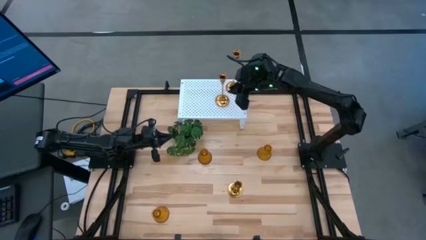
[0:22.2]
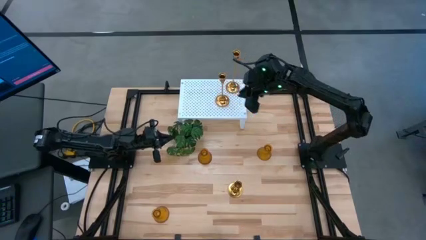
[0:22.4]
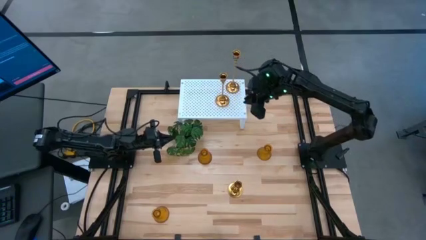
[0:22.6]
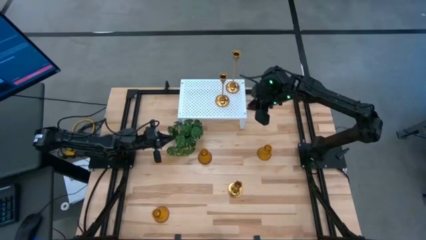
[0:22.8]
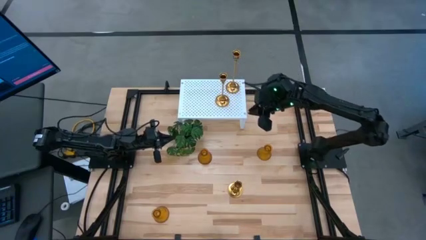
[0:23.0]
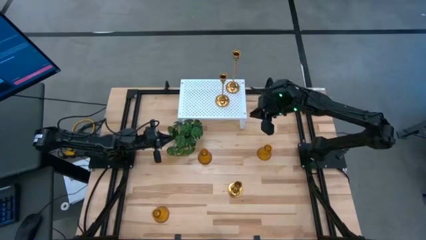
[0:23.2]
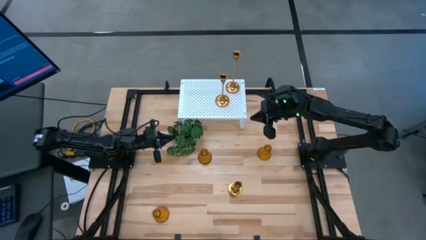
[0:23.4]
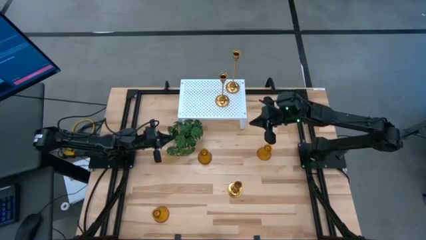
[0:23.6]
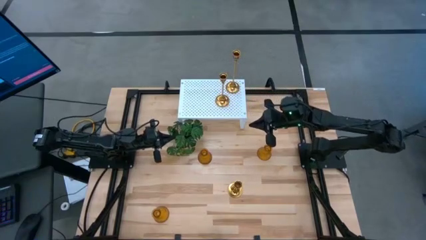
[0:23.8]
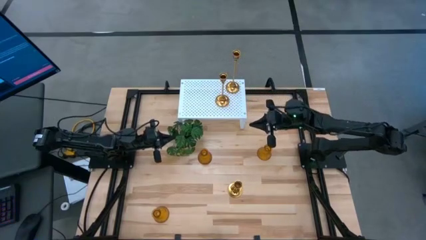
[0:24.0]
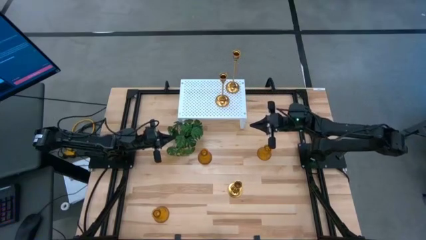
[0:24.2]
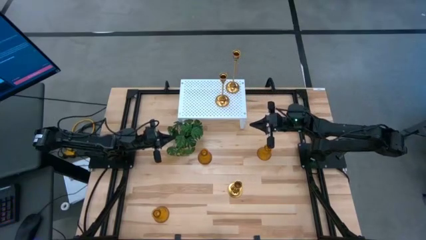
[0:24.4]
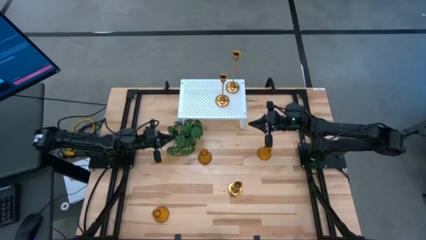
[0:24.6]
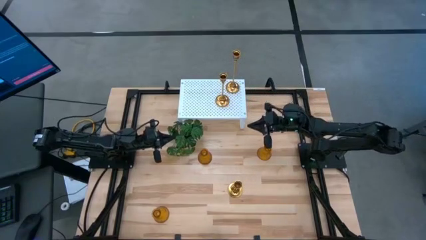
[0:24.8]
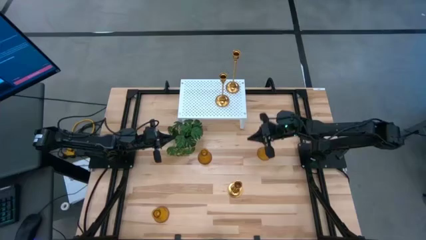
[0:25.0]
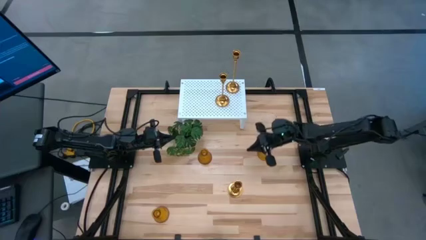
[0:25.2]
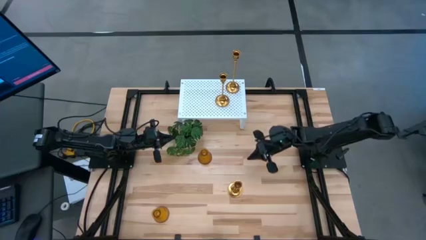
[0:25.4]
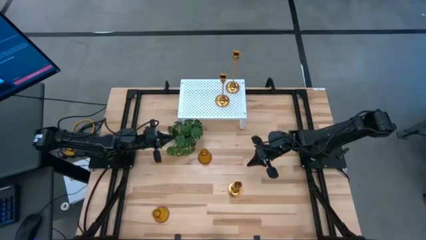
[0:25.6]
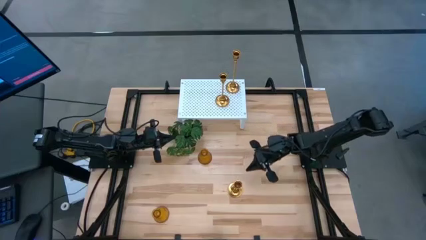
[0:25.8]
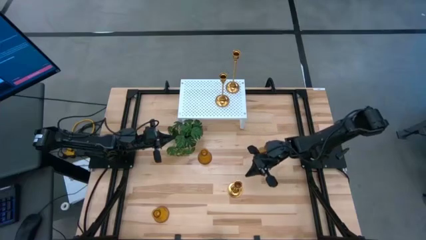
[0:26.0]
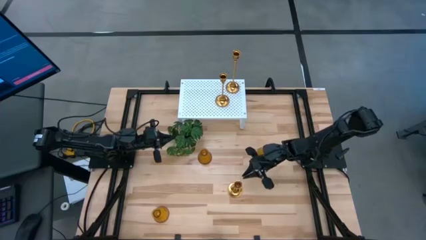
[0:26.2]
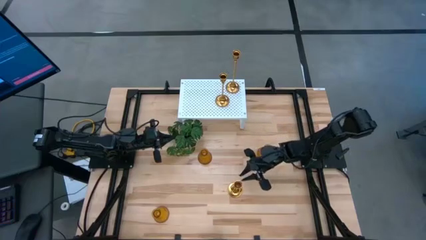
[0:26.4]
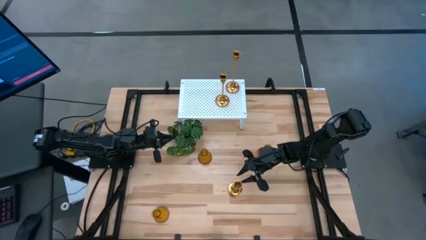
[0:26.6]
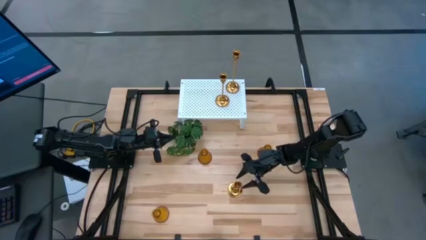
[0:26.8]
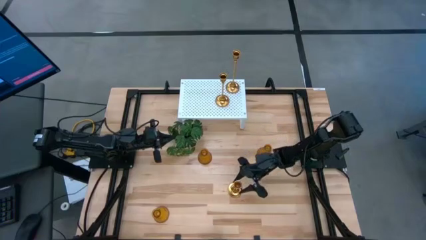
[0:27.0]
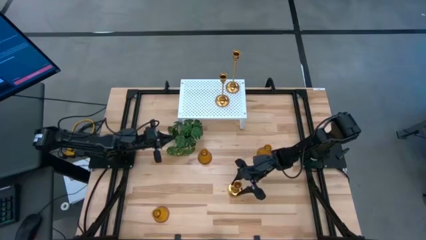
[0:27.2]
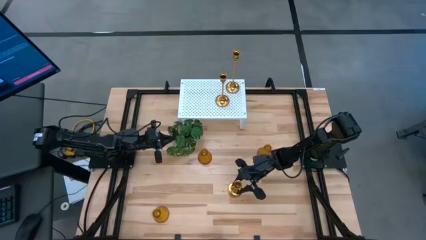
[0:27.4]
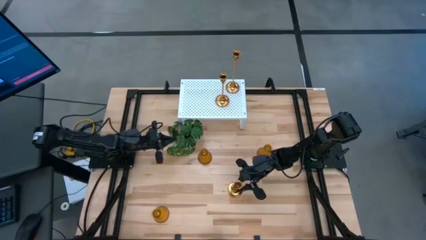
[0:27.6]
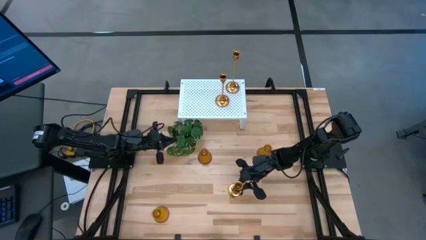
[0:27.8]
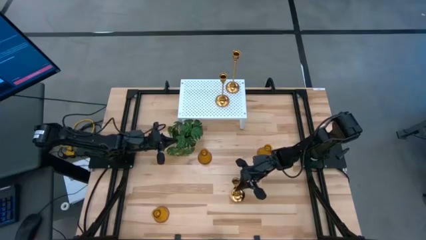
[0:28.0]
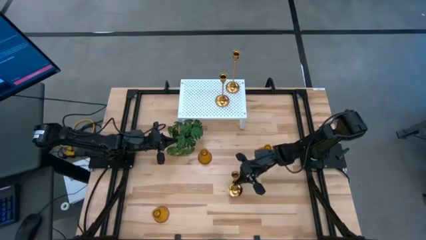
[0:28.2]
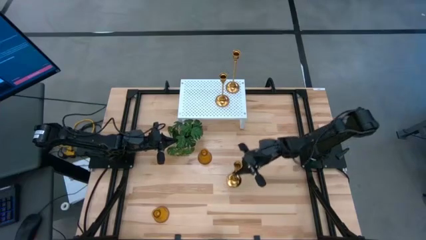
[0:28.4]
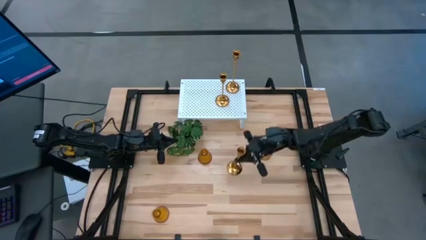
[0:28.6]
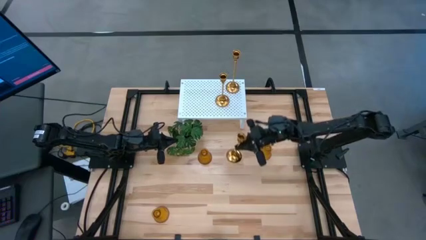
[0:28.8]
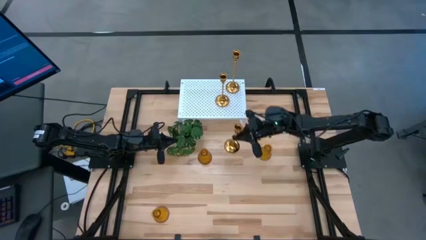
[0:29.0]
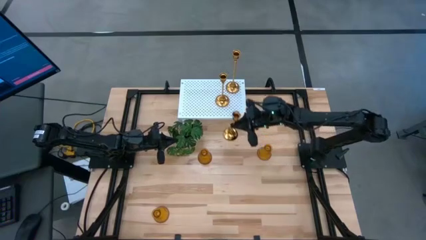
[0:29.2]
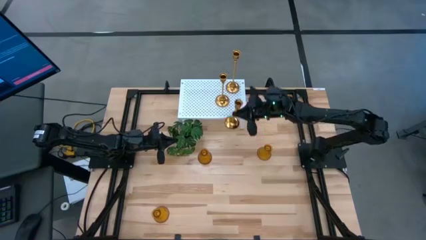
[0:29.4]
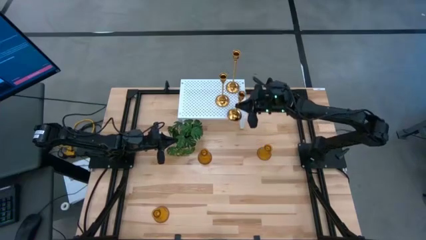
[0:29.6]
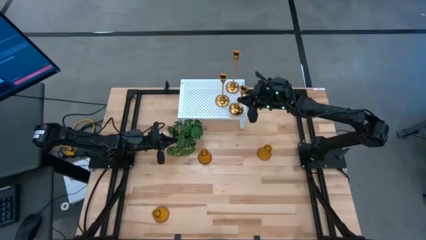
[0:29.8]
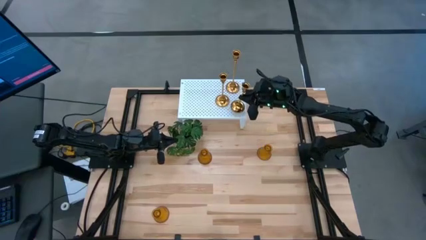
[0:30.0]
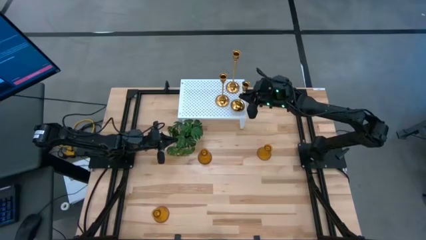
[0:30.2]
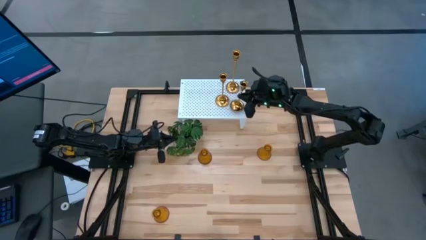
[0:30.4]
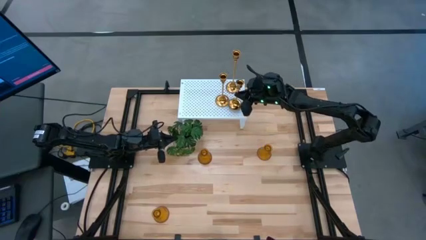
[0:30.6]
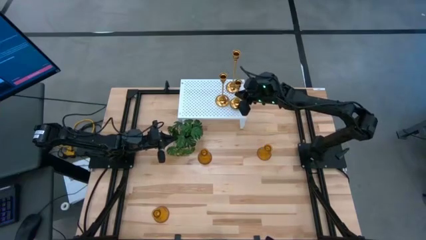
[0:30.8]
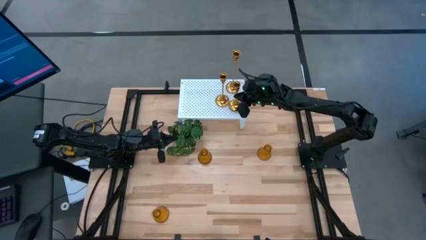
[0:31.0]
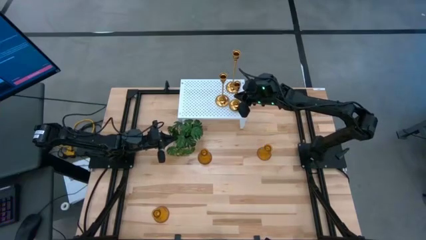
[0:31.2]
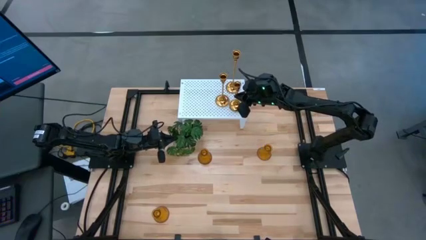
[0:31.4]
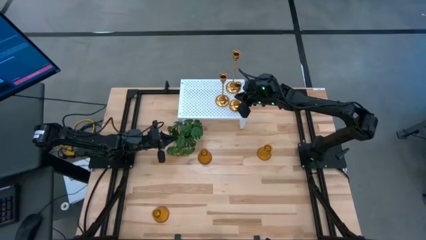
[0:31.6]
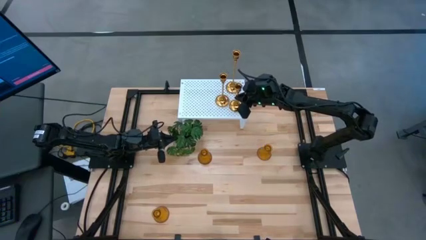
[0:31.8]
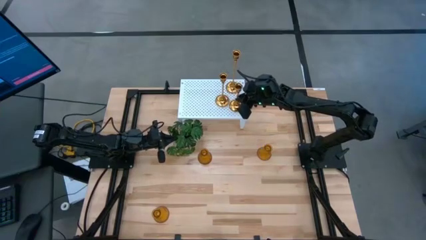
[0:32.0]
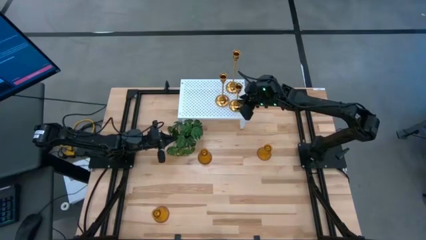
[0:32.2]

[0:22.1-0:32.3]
Task: Pick & Place candle stick holders
Put the gold candle holder on the shelf

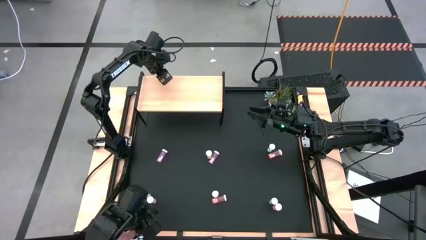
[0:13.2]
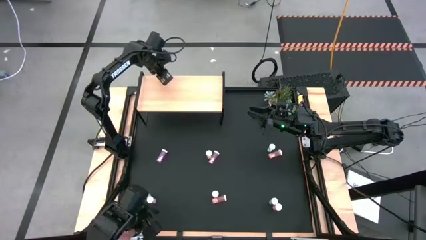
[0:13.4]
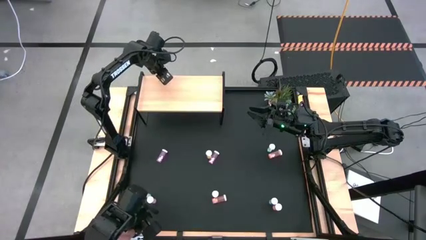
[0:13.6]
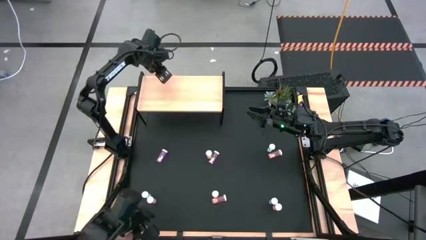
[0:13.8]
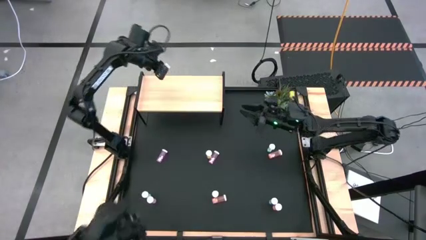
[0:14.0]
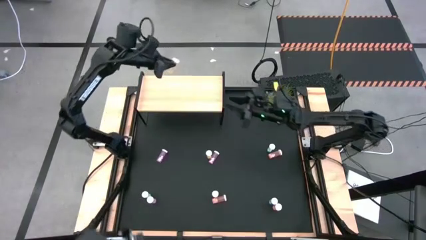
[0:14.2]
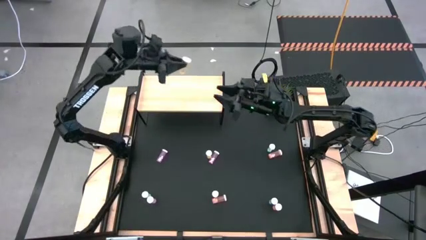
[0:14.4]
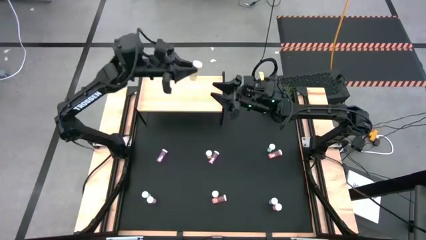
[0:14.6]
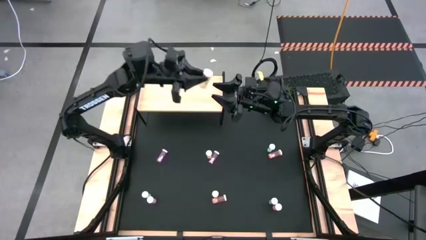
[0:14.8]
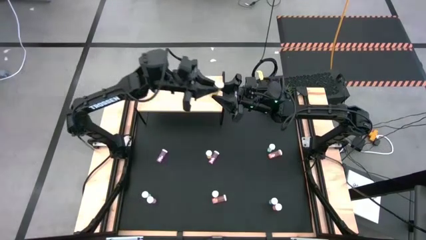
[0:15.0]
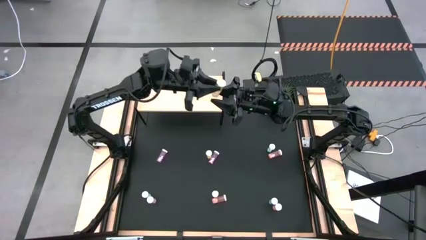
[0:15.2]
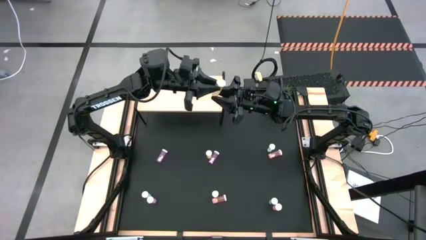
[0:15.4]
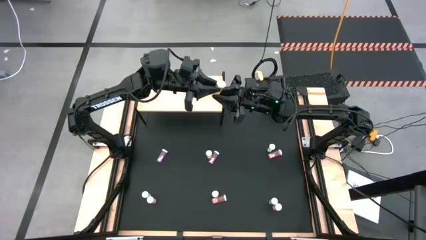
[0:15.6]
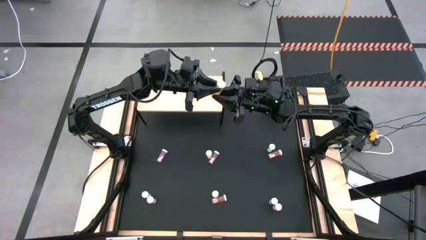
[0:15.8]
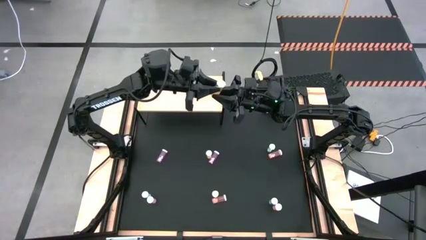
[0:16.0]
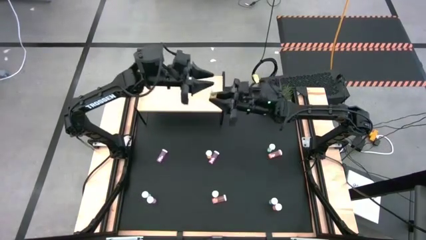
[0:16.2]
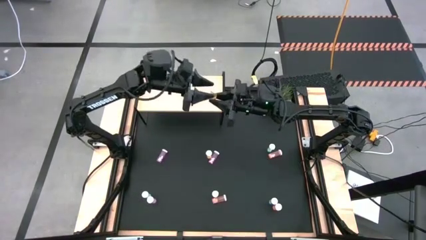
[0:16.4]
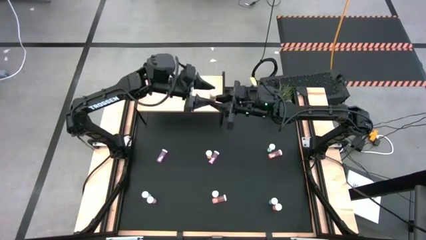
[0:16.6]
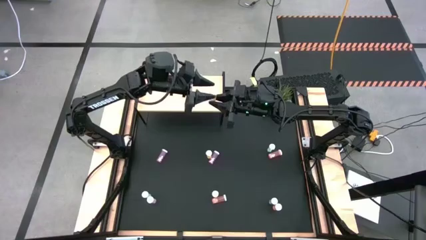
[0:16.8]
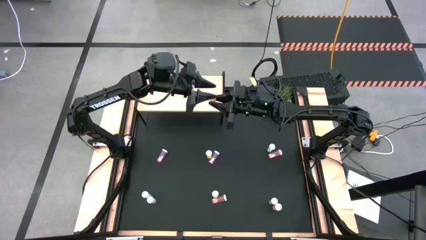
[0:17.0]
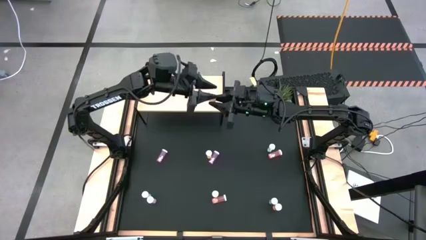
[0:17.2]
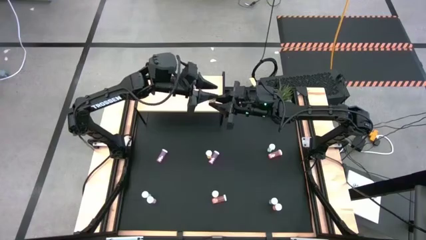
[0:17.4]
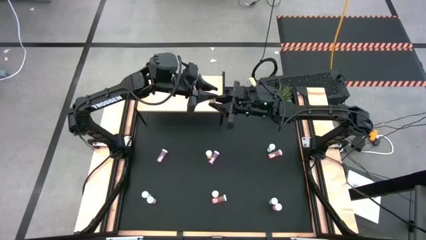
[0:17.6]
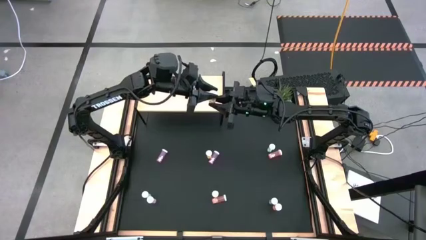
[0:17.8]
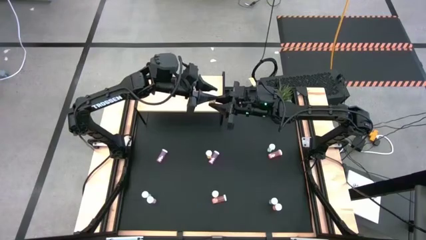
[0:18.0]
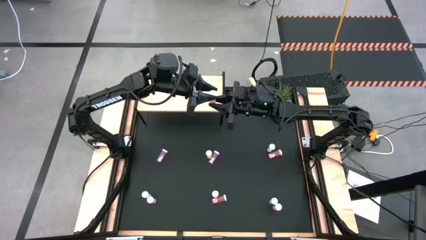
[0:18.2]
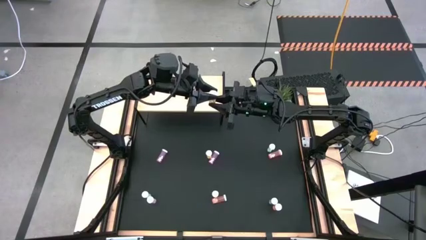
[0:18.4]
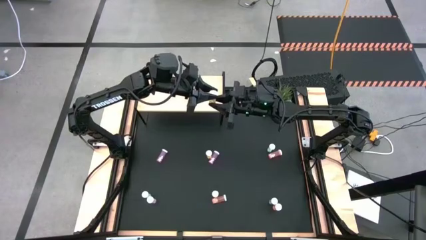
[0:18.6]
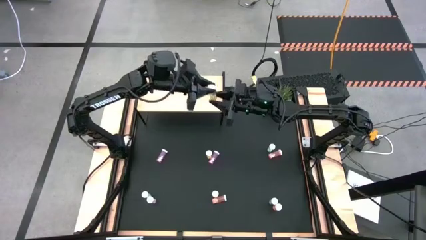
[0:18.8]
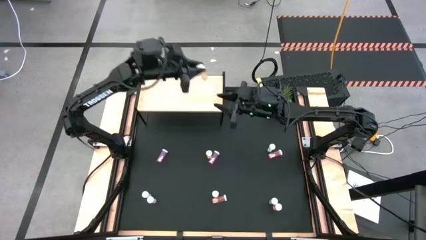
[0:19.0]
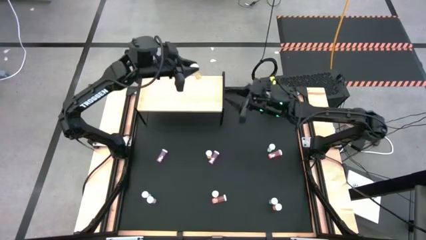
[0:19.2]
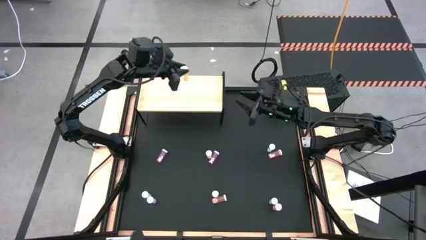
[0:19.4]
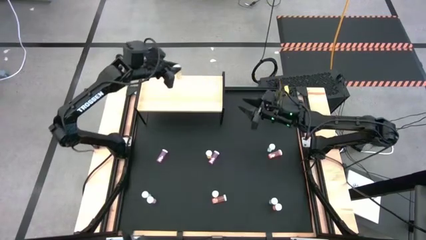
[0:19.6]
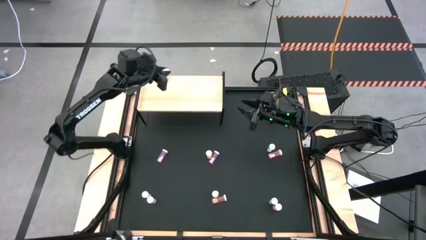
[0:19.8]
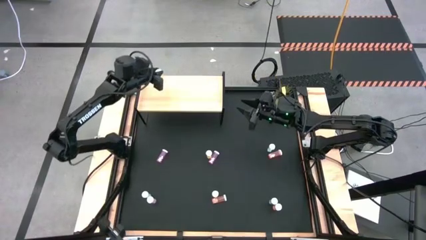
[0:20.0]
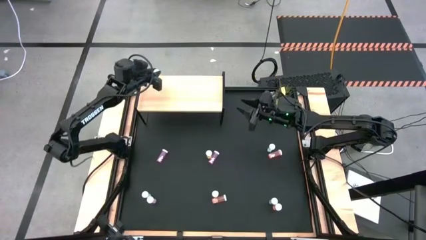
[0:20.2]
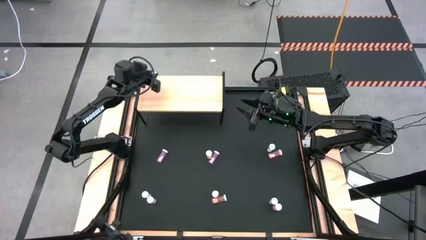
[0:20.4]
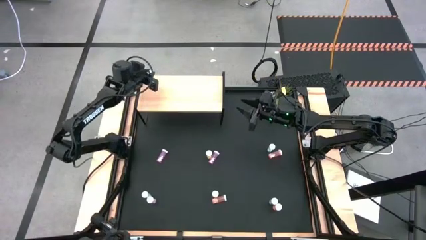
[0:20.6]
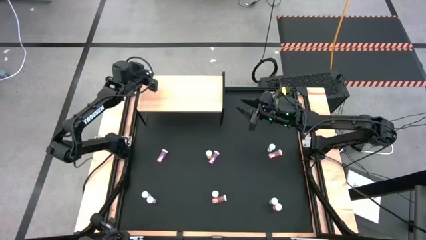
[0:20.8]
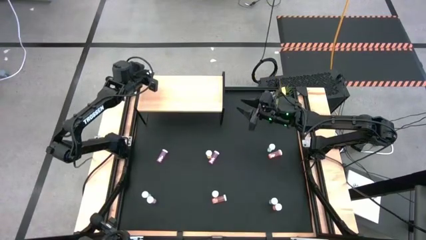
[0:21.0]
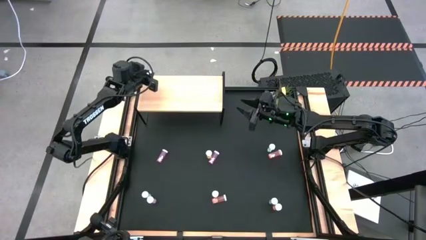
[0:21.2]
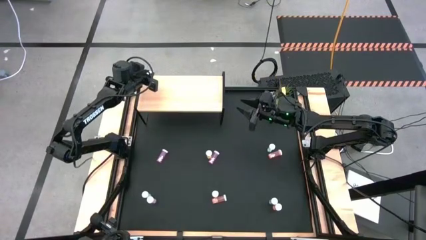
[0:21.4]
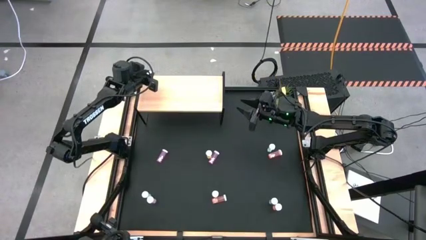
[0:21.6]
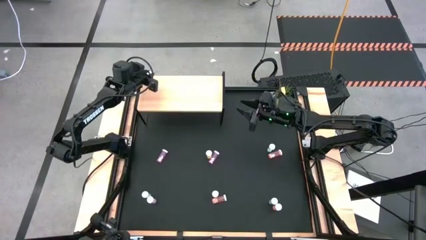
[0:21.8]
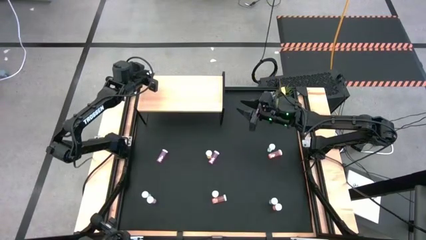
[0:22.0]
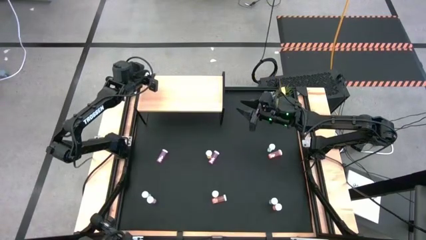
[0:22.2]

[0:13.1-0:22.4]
Task: Pick and place medicine bottles onto shelf by color
Put the top left yellow medicine bottle on the shelf
